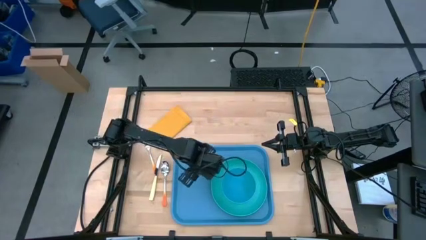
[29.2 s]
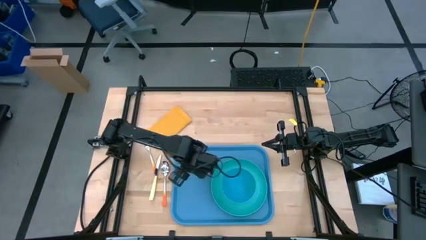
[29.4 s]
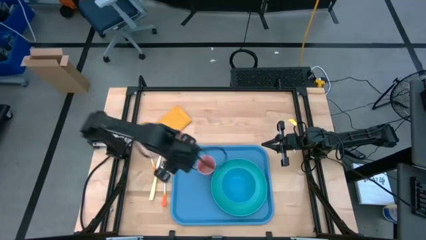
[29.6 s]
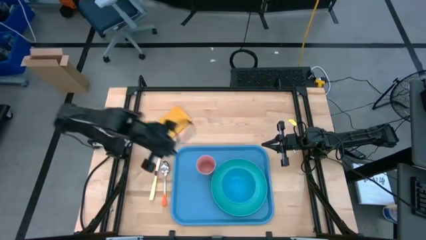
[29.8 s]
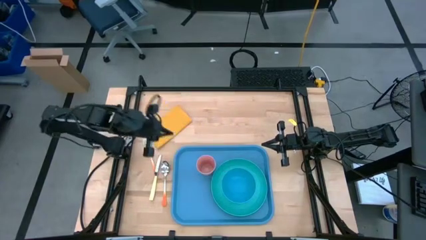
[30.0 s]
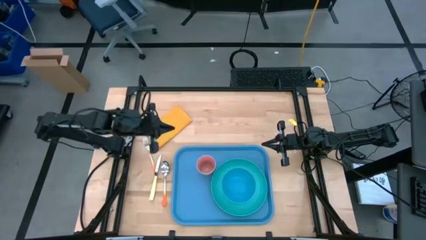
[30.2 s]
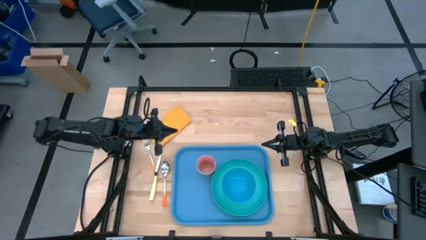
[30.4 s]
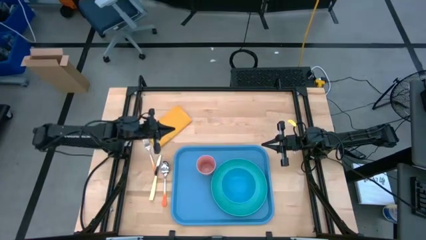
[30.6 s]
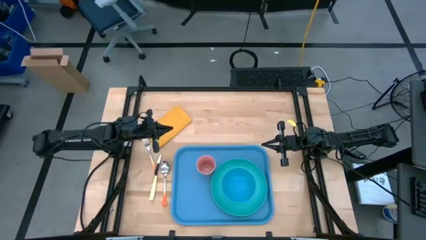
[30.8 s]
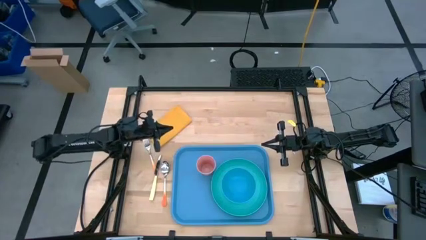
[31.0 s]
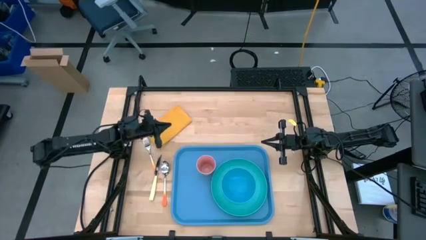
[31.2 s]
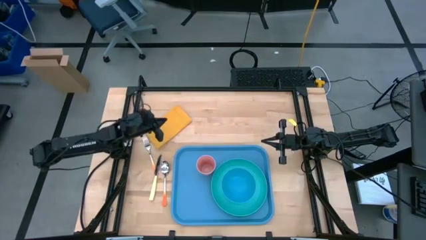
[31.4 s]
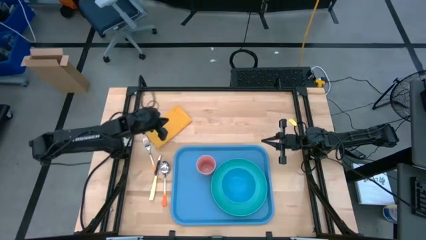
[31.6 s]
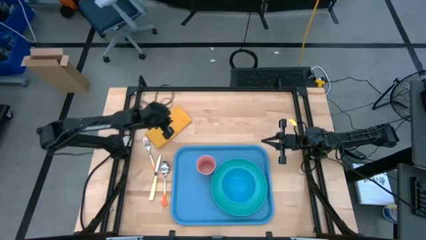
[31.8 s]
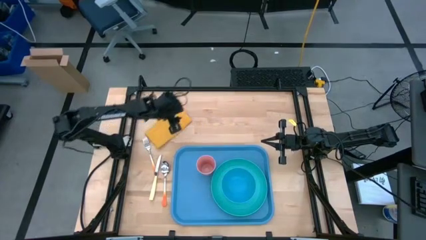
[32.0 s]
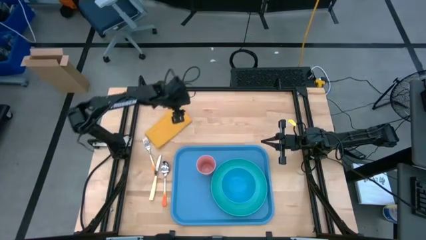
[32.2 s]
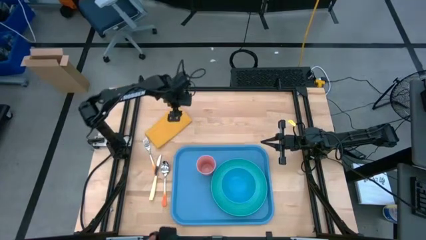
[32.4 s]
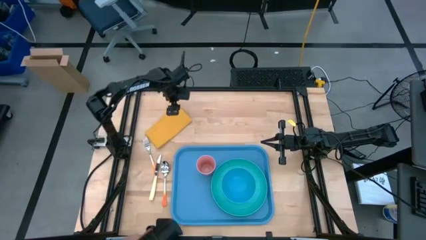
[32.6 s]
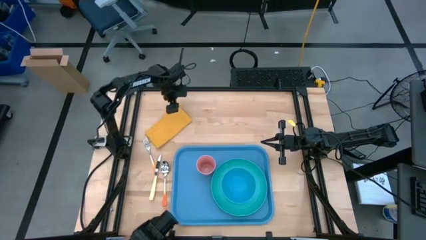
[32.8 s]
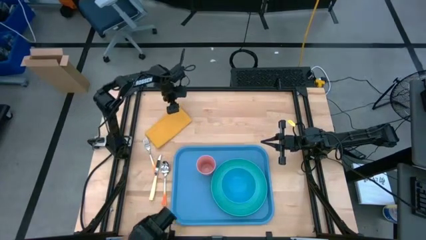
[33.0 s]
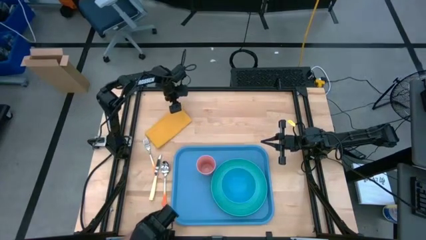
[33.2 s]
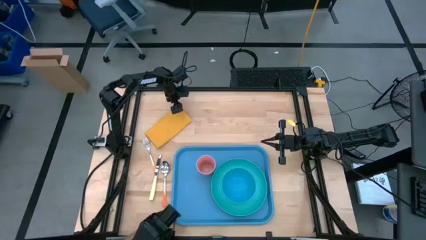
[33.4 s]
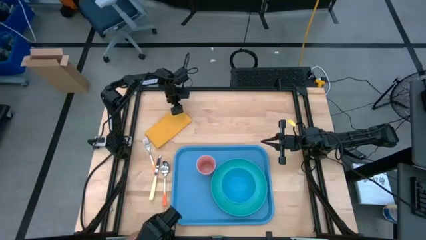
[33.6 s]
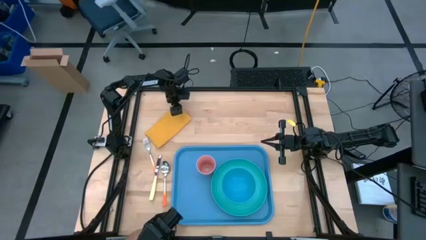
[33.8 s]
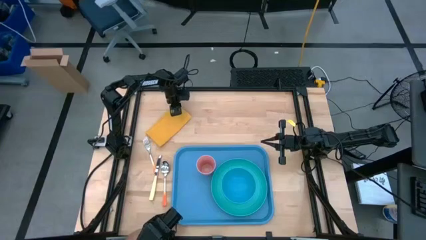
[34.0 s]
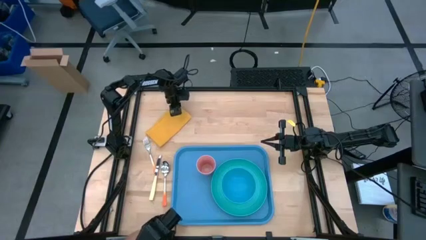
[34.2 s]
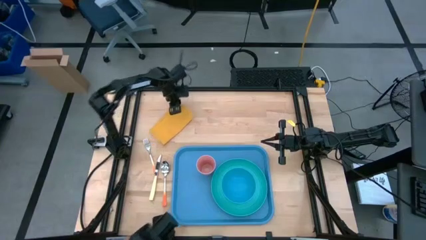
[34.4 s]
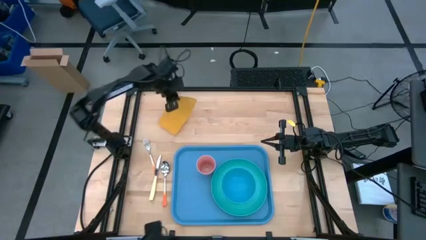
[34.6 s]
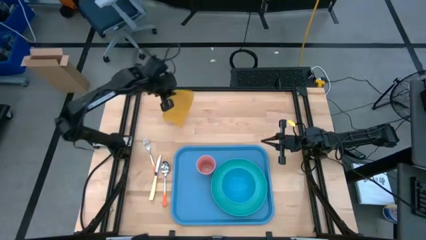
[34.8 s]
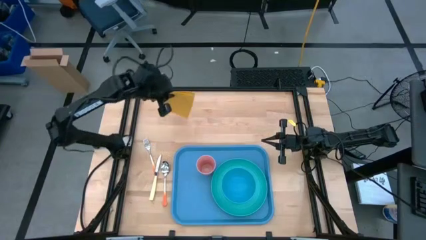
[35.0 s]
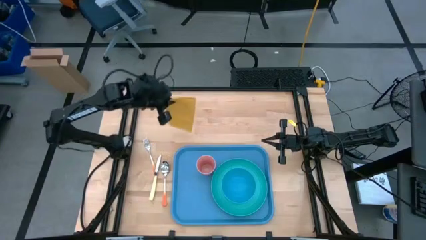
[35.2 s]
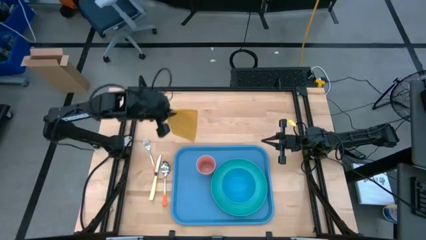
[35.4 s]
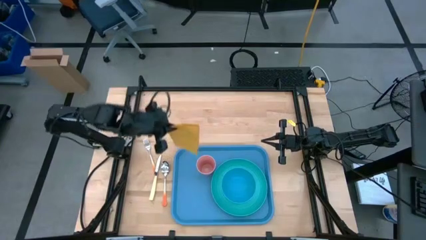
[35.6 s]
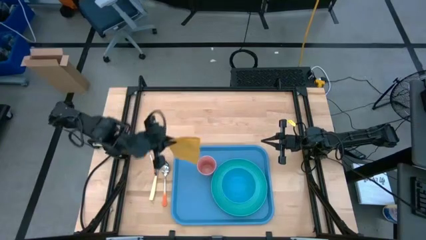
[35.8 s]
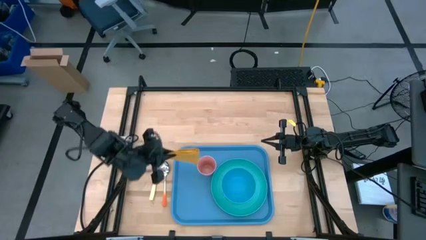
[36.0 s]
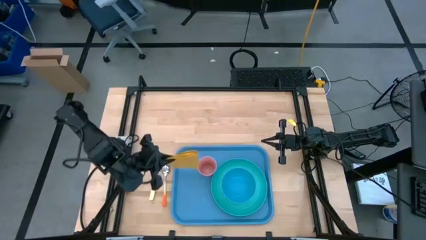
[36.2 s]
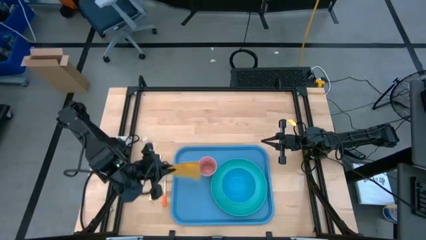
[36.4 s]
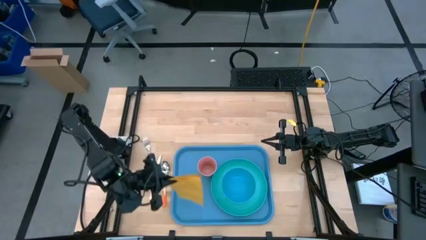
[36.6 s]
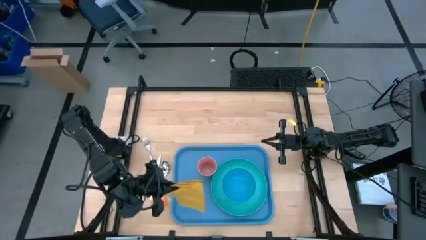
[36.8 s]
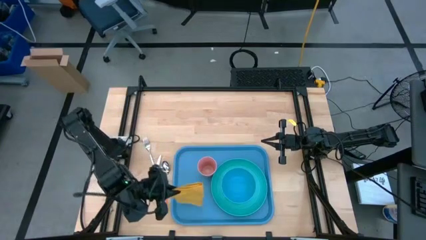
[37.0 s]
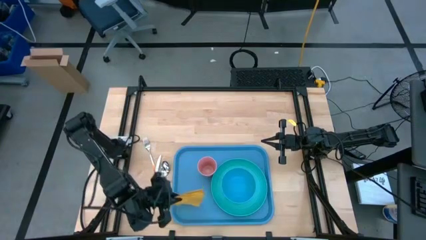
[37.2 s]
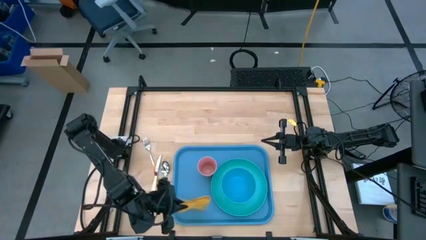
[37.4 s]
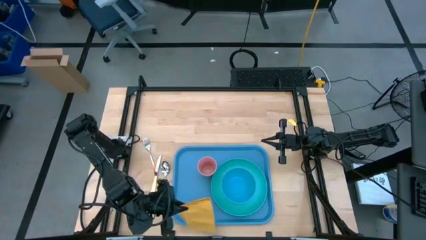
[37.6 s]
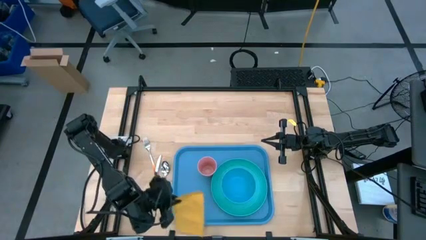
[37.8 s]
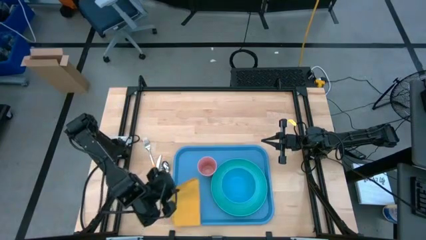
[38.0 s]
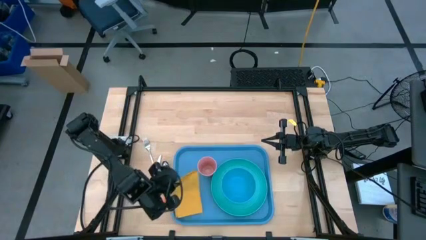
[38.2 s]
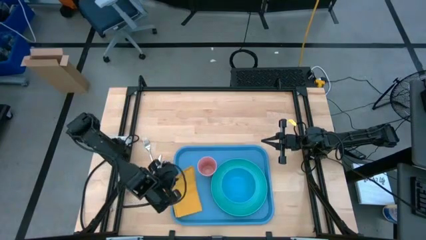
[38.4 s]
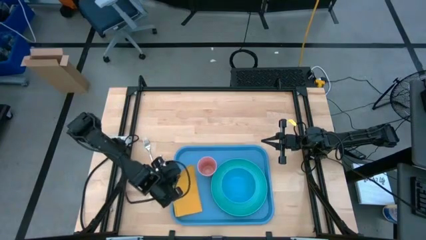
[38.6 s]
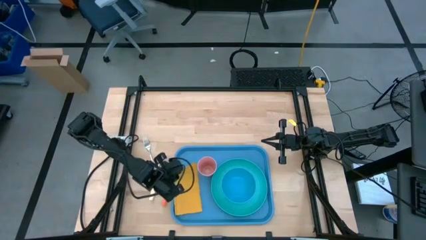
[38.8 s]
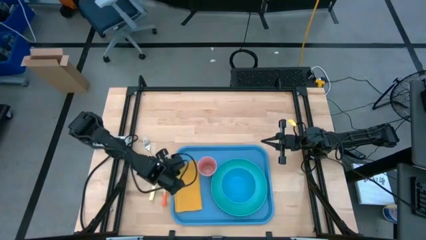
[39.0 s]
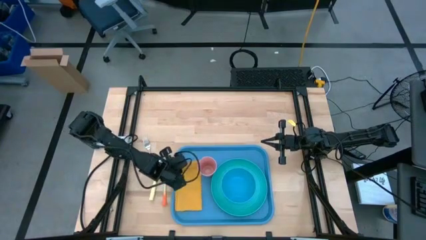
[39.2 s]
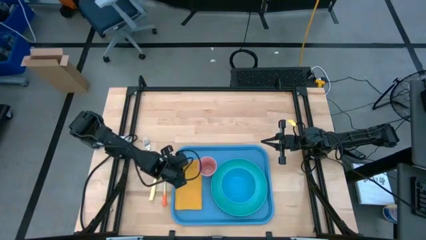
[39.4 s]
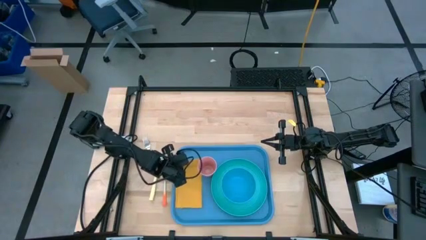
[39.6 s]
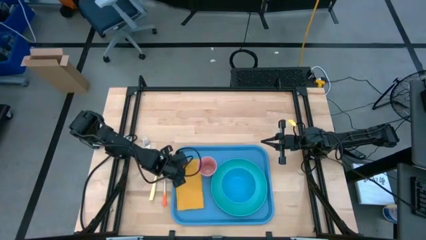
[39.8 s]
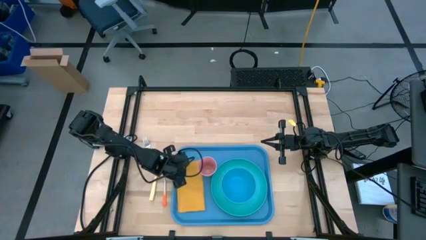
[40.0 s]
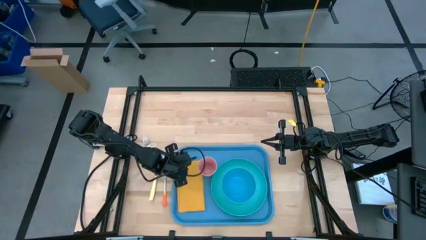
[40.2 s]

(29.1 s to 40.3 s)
Task: Set up tray
Put the yellow table napkin to the bottom left of the pink cup on the blue tray

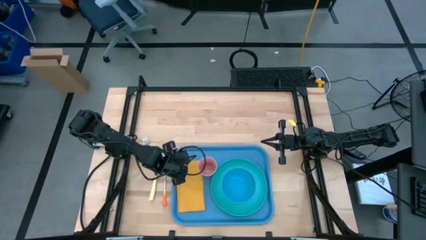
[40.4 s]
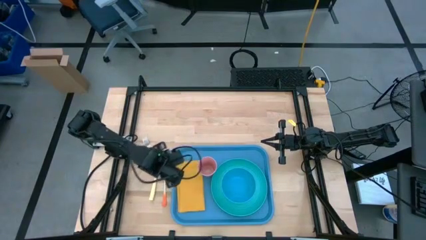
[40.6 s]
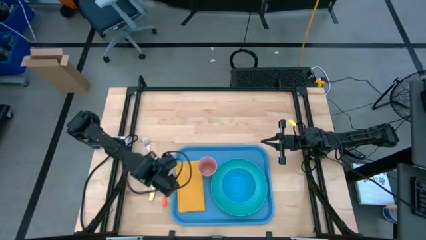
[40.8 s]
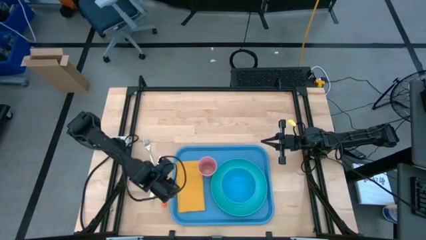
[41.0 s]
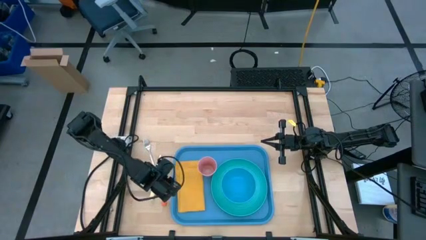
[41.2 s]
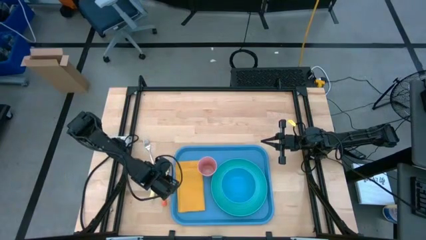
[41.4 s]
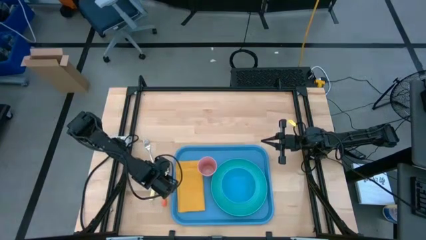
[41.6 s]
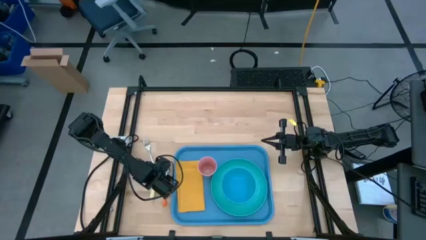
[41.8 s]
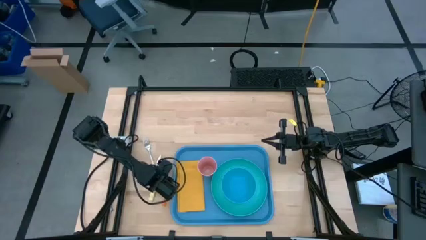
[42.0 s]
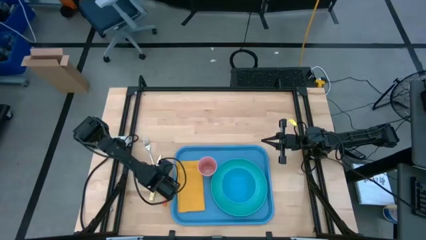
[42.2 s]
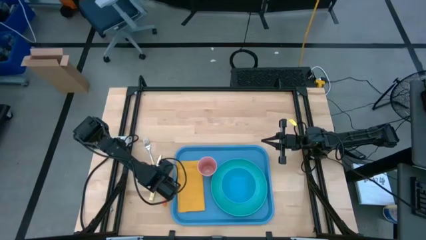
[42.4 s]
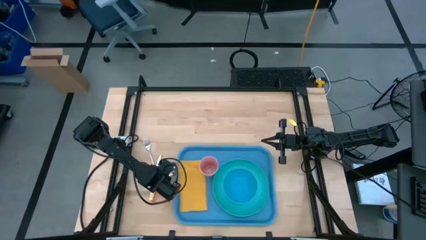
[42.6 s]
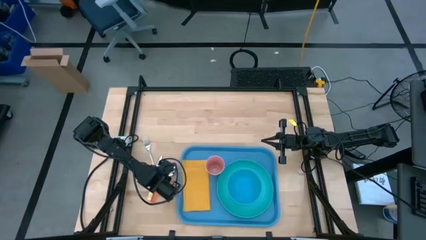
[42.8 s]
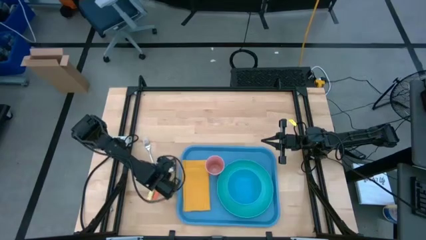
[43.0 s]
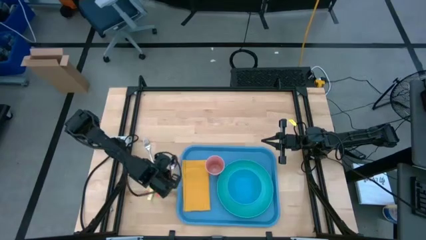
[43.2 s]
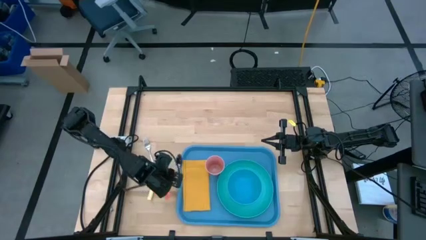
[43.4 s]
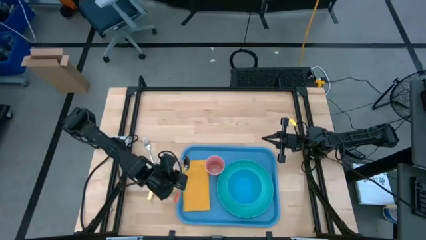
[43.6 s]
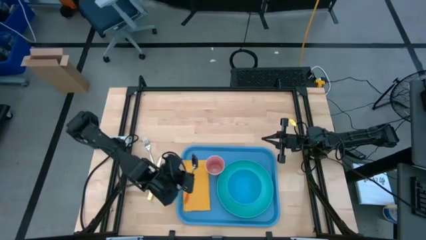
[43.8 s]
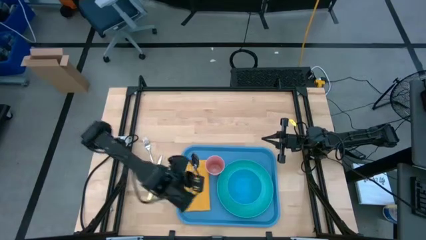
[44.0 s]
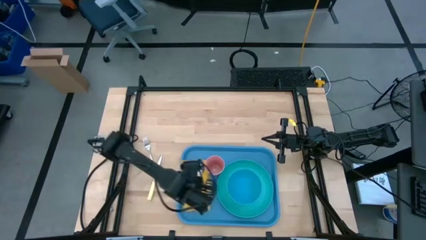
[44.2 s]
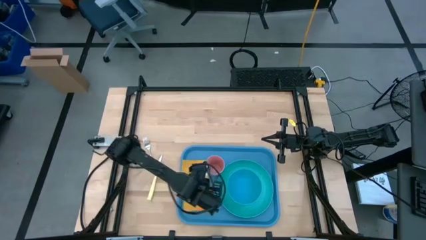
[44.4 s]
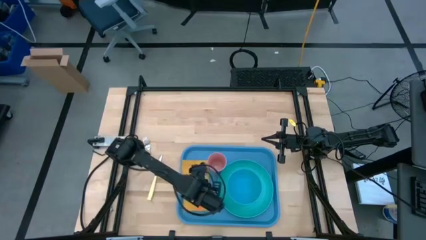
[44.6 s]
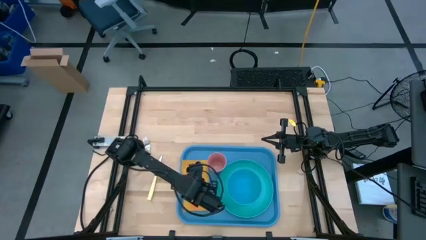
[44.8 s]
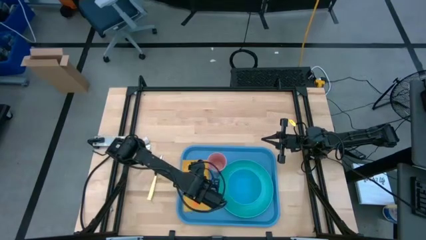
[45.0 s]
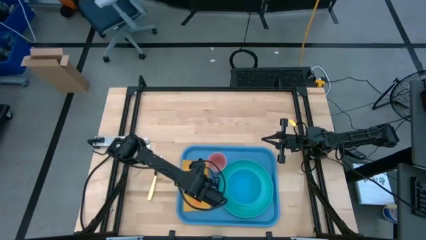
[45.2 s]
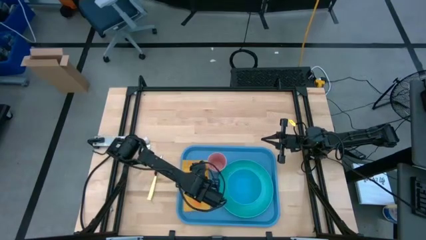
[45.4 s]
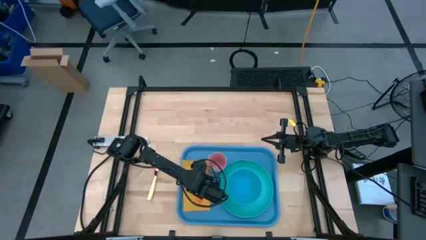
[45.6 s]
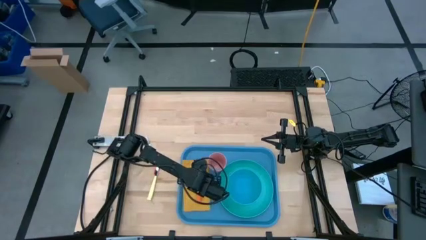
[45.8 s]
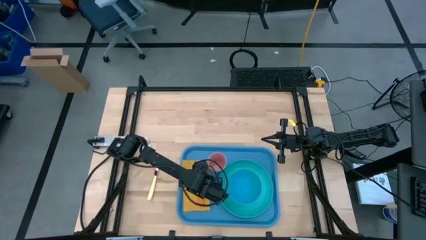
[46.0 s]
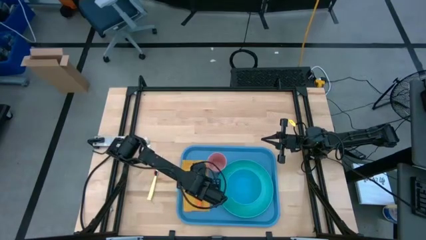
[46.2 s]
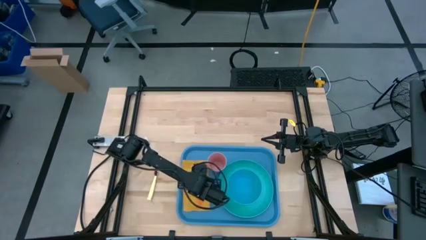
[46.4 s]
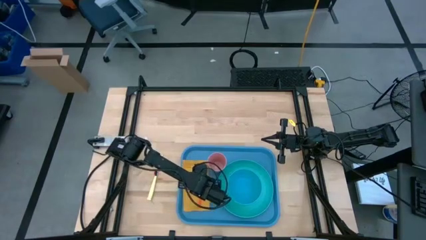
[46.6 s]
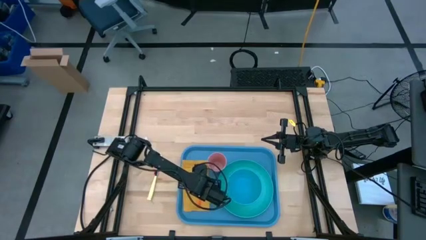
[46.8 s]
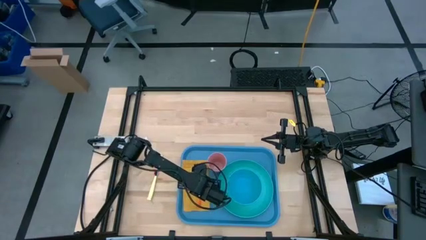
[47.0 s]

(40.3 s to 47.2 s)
Put the orange spoon on top of the yellow table napkin on the blue tray
